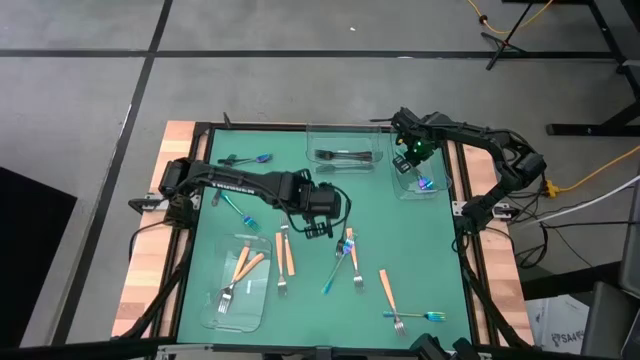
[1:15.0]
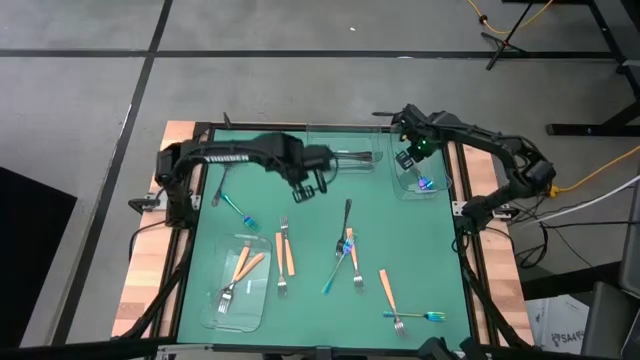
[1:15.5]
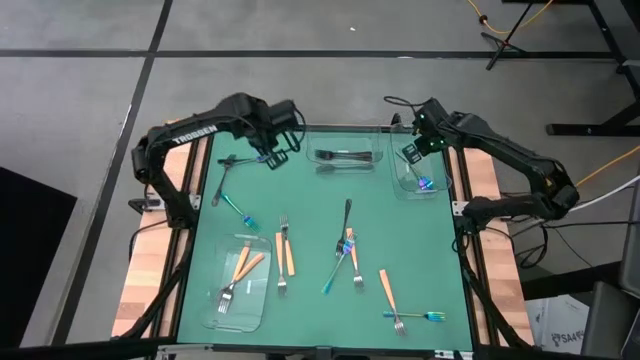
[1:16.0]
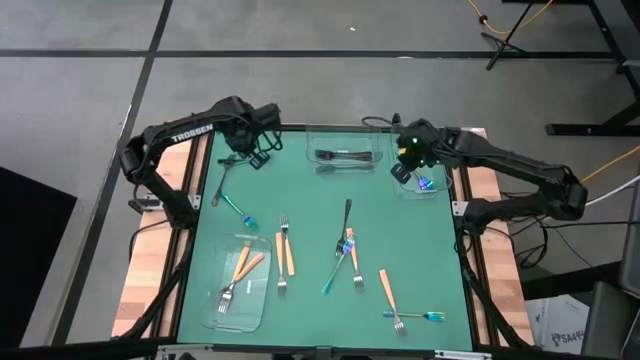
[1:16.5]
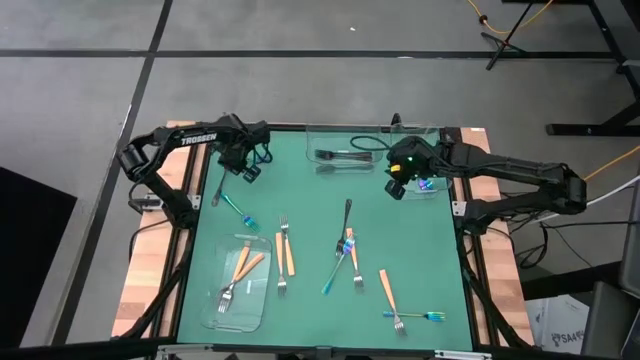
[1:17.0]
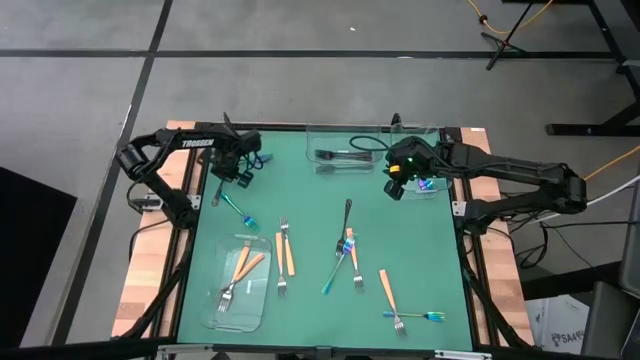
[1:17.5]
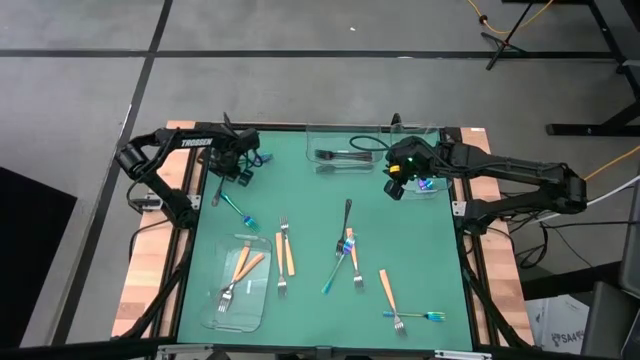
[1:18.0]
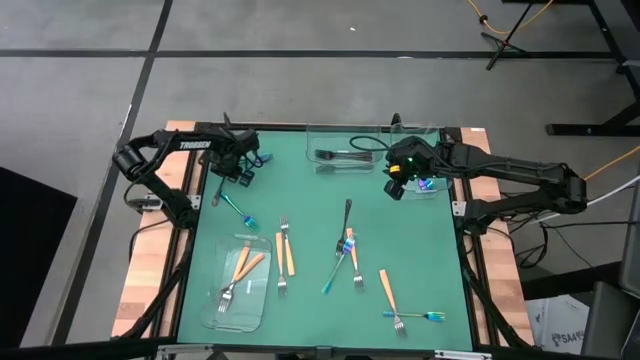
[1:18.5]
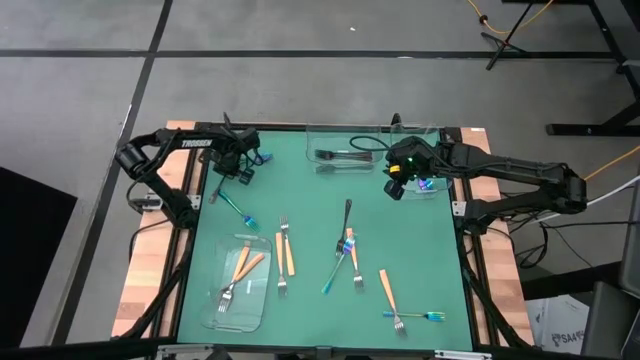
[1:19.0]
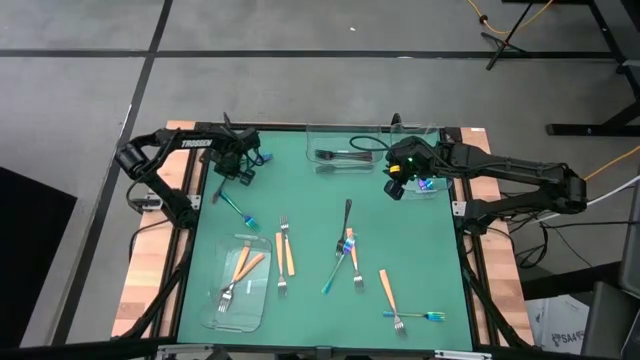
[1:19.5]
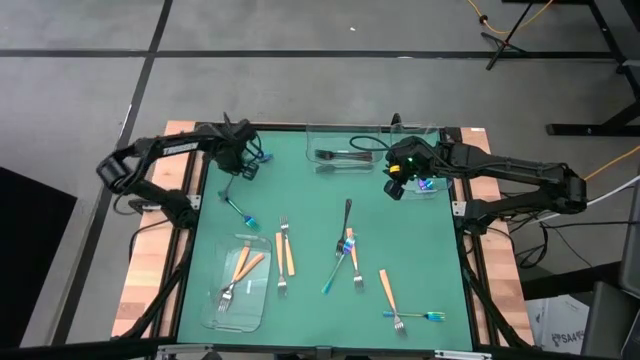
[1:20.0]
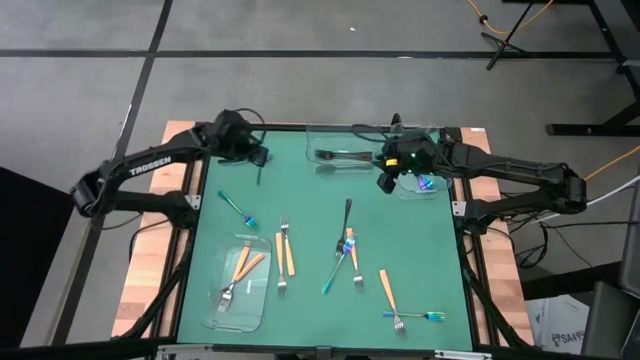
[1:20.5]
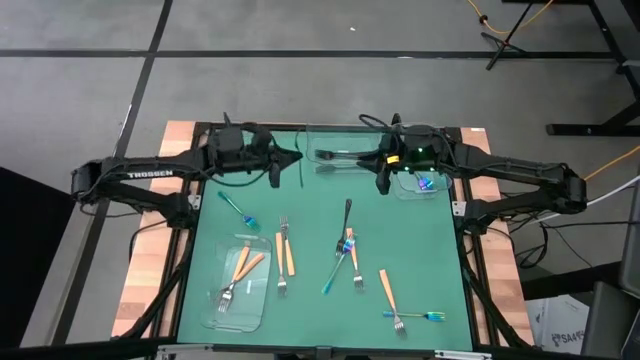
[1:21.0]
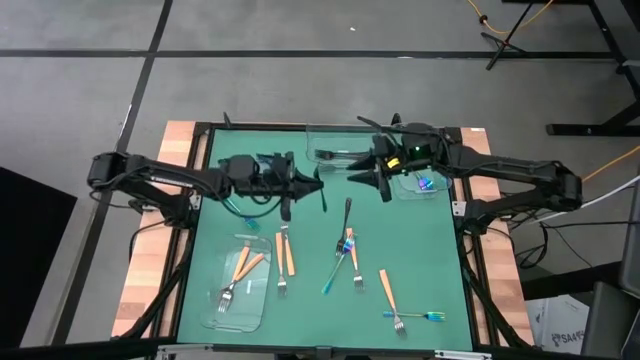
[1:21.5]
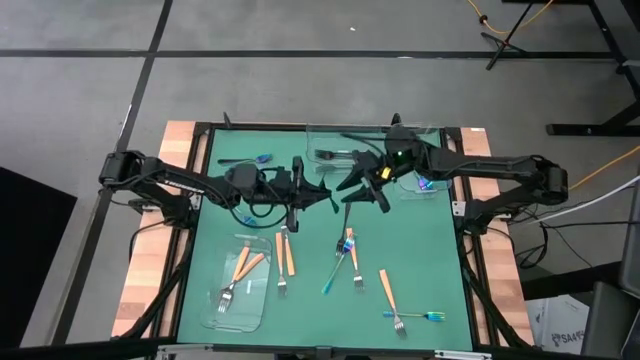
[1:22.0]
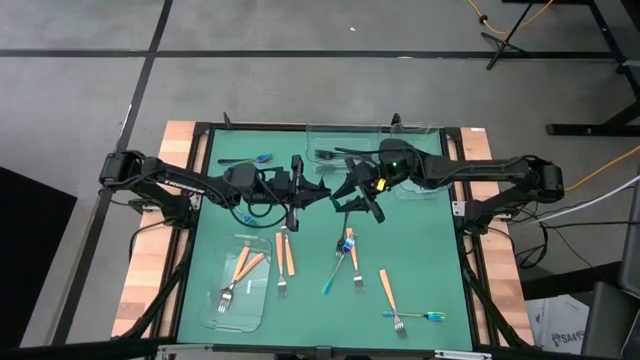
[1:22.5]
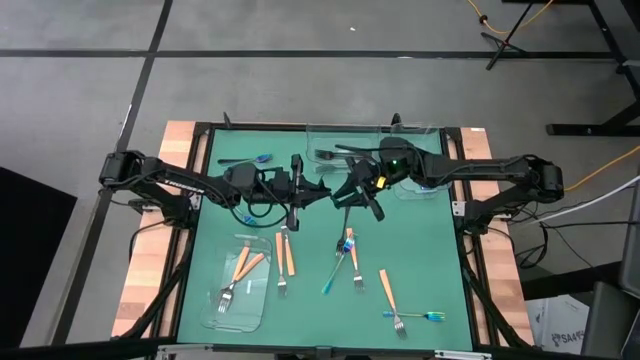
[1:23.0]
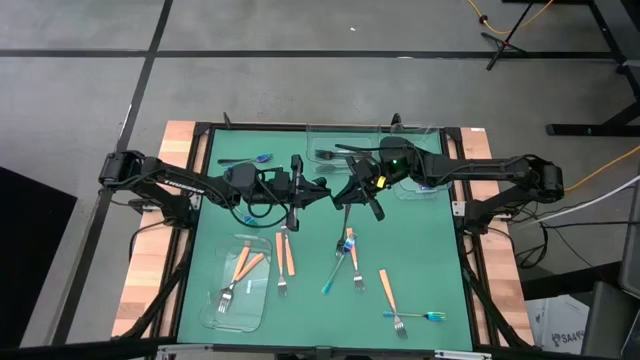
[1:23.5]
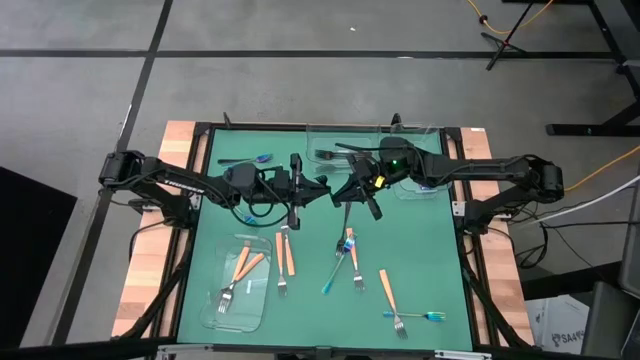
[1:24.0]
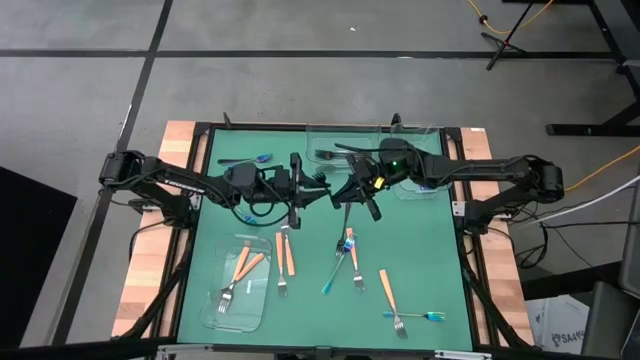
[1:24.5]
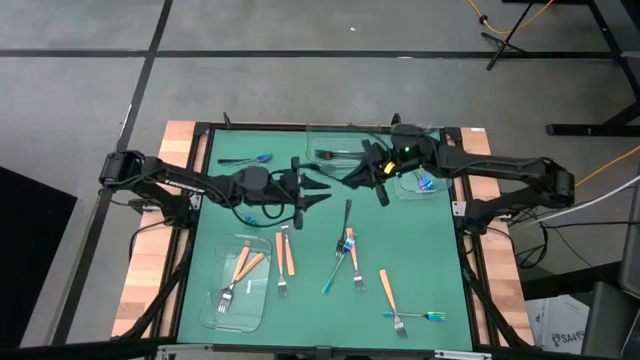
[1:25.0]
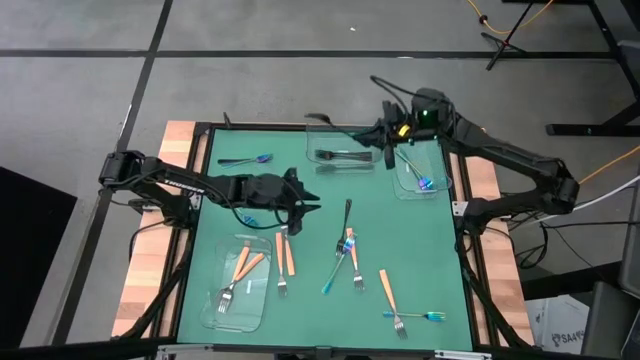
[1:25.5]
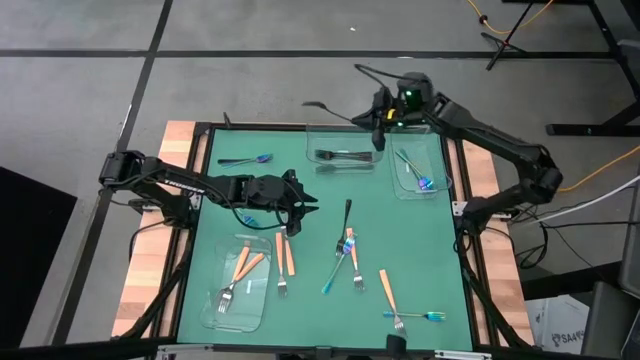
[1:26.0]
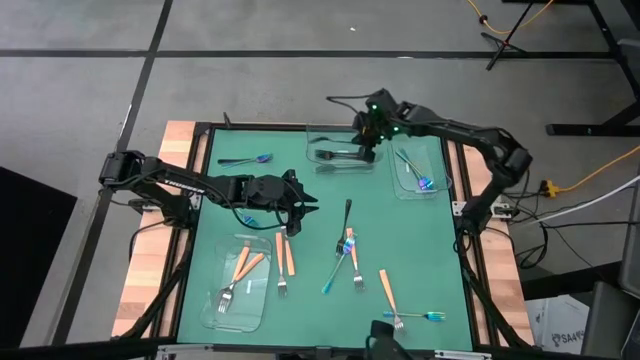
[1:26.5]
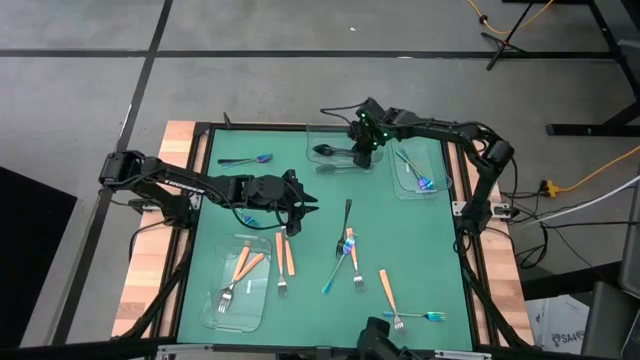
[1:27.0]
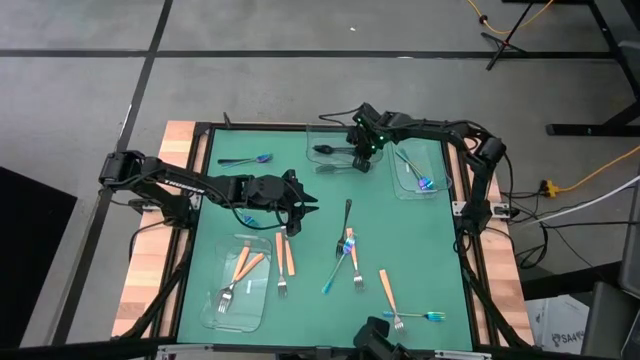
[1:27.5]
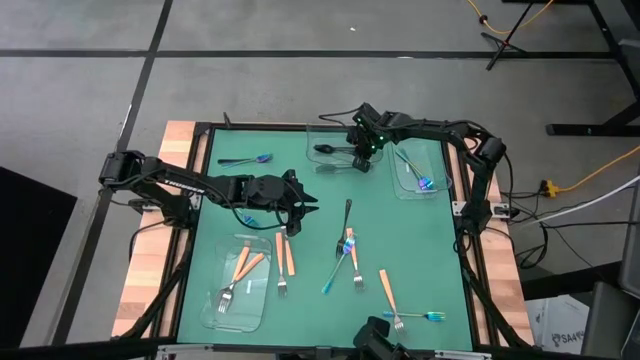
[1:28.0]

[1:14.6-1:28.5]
Task: Sort silverware by color (type)
Put the black fork into the top left transparent bin

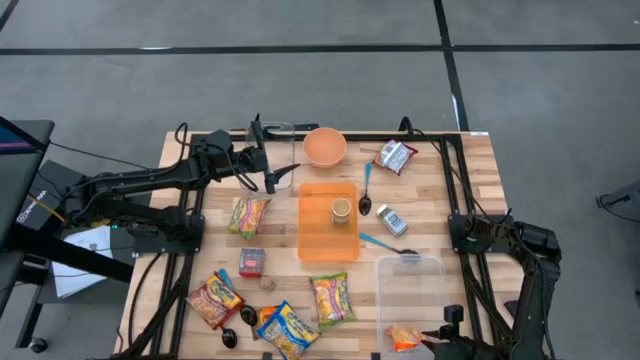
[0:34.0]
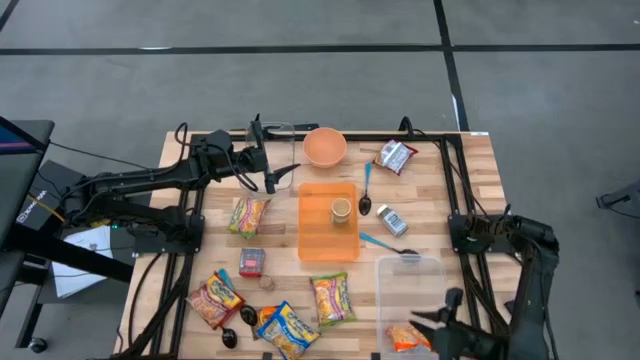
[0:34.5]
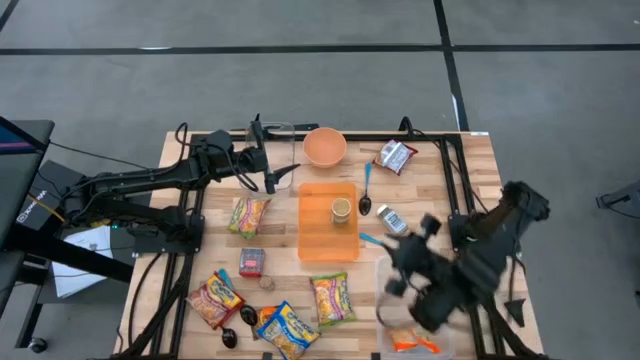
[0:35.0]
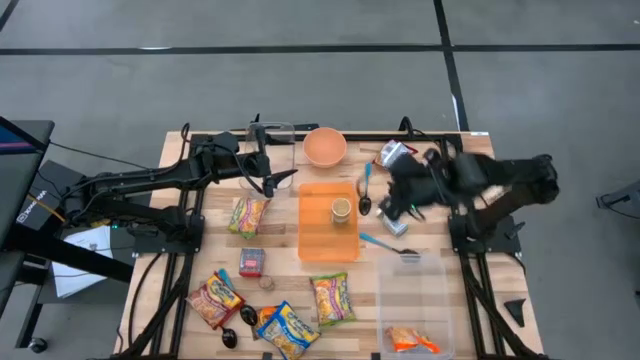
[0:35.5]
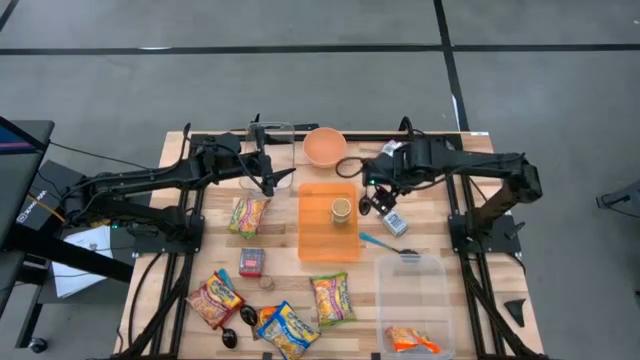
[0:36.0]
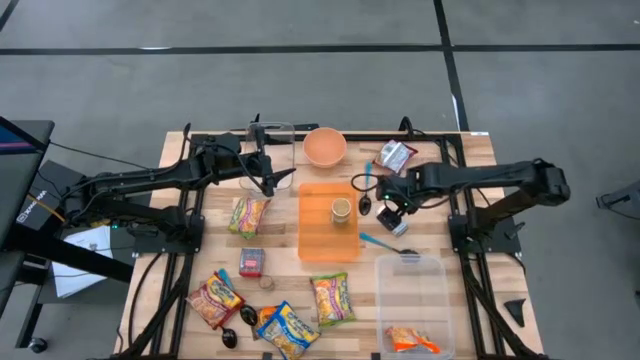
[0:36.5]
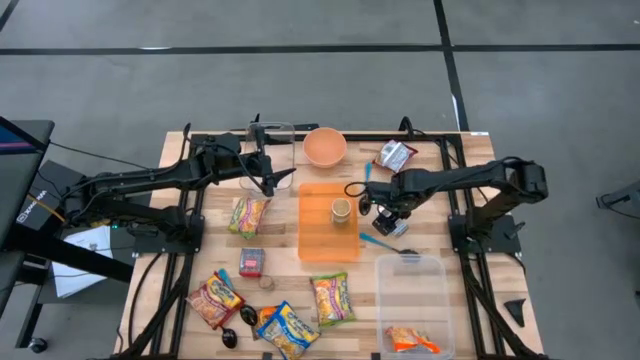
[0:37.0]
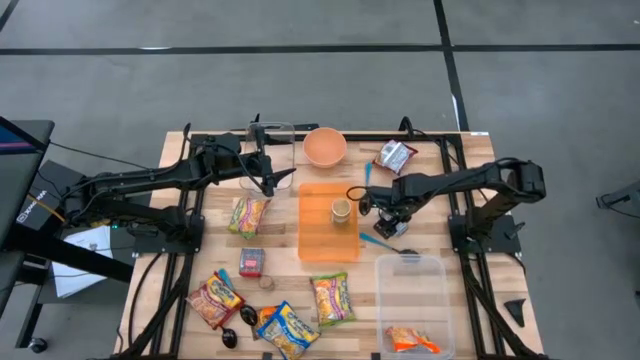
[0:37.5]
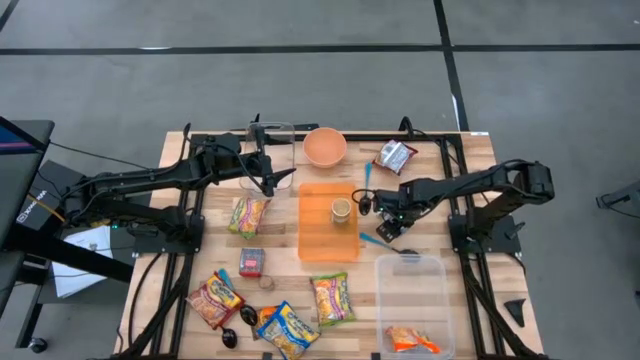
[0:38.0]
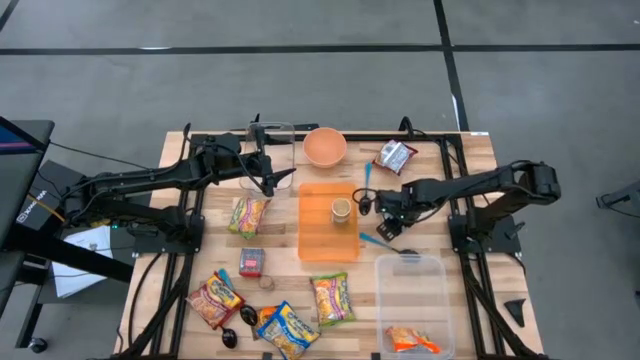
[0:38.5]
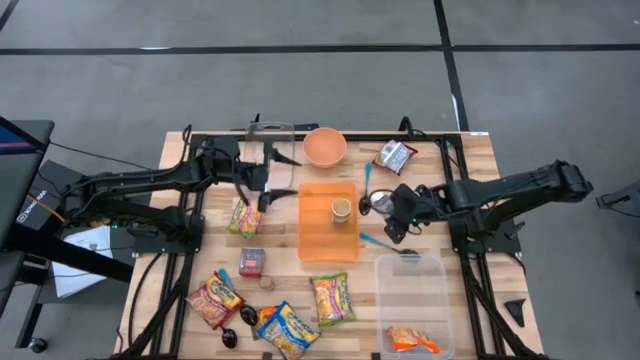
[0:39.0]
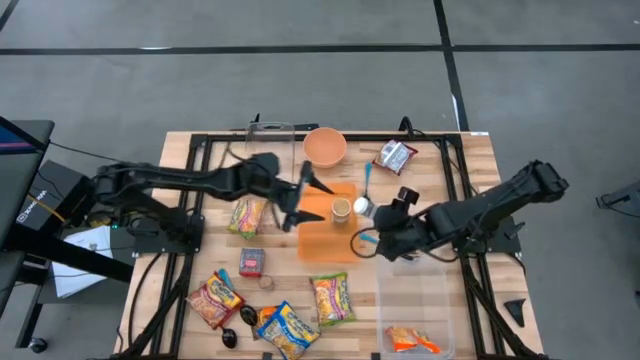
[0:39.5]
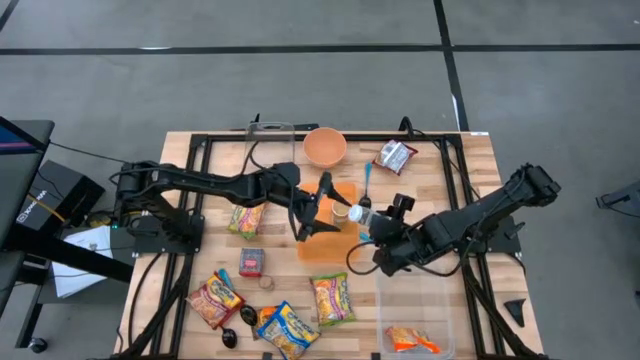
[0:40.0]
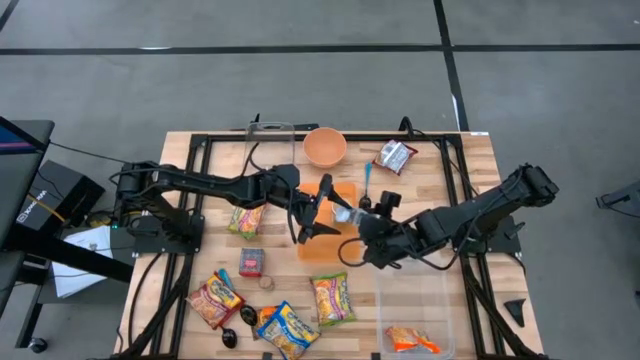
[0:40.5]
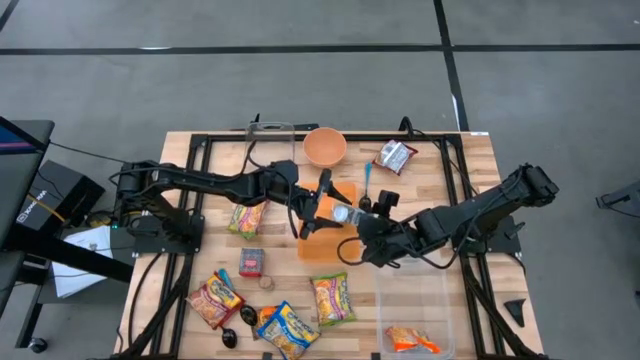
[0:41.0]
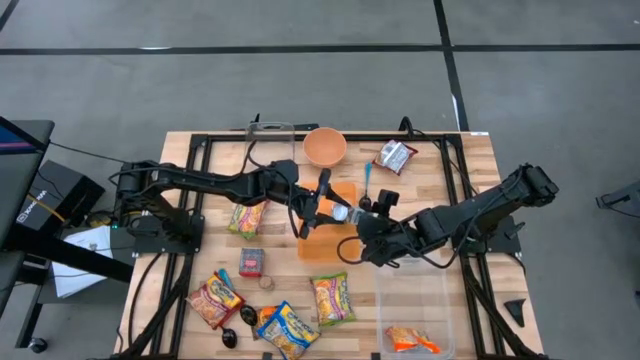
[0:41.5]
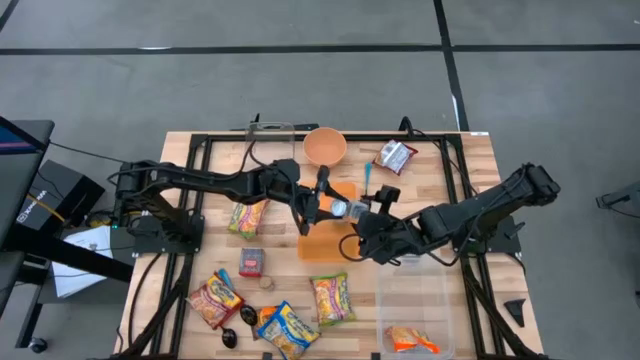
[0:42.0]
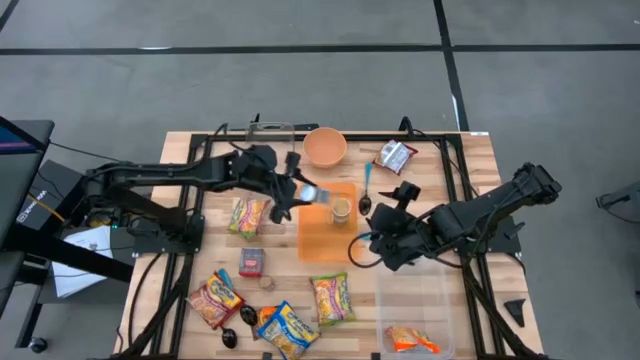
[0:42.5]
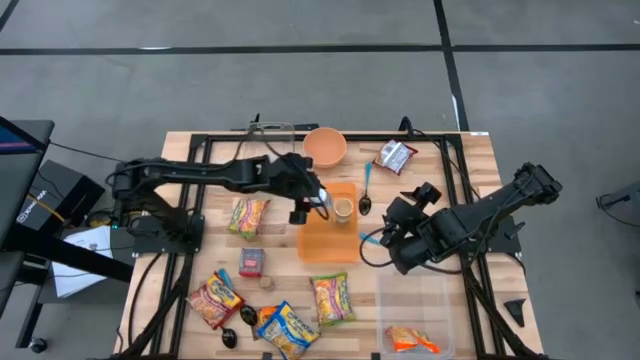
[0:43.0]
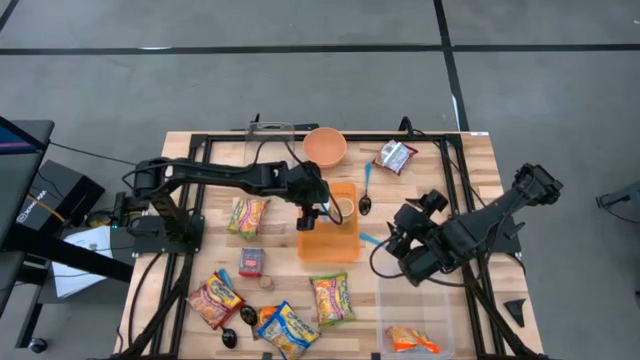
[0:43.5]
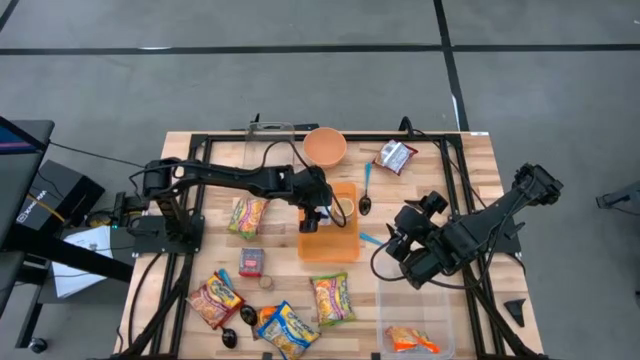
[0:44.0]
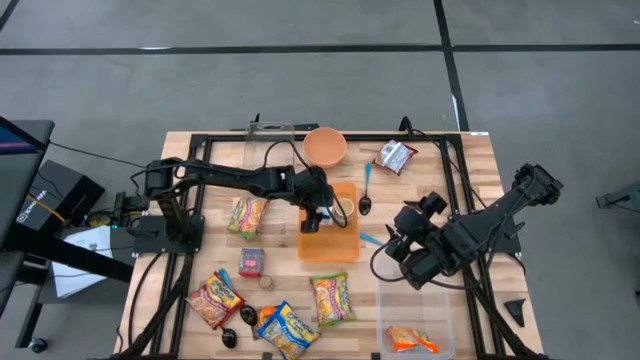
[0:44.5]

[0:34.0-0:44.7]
Task: Pick & Place Food Item
Put the white seasoning bottle into the orange bin
